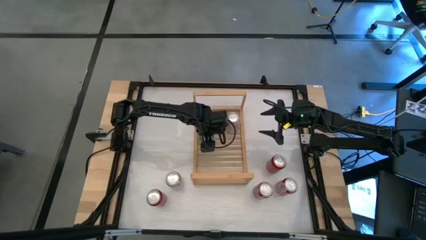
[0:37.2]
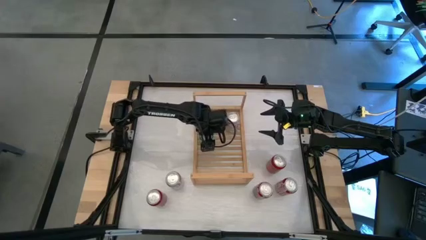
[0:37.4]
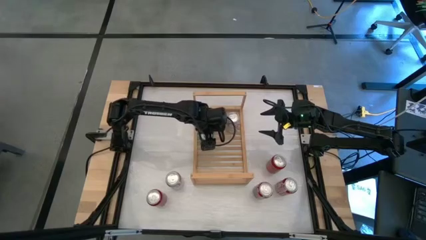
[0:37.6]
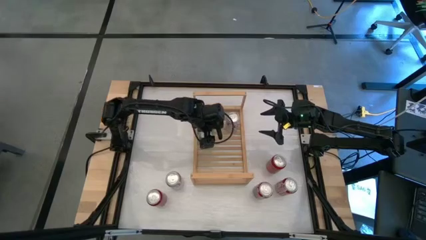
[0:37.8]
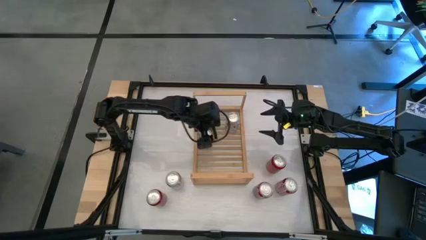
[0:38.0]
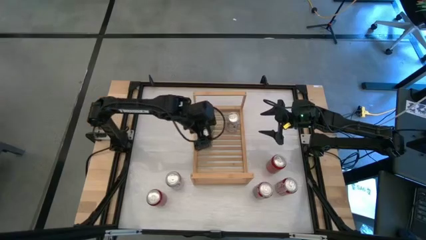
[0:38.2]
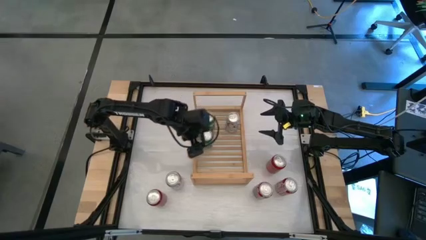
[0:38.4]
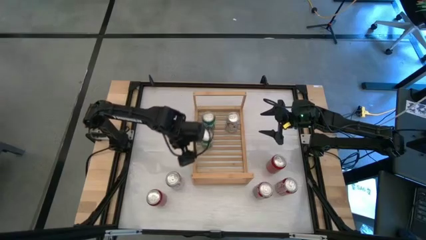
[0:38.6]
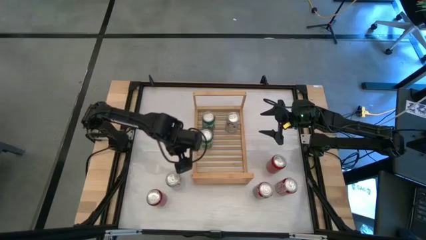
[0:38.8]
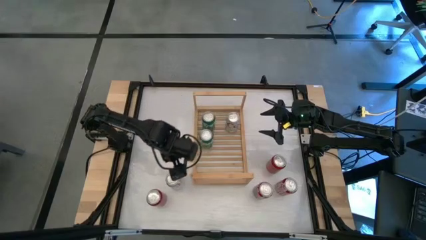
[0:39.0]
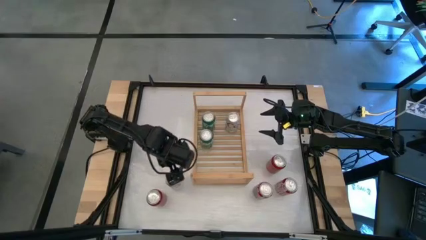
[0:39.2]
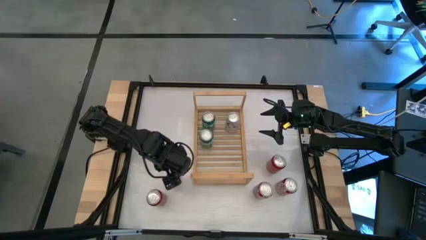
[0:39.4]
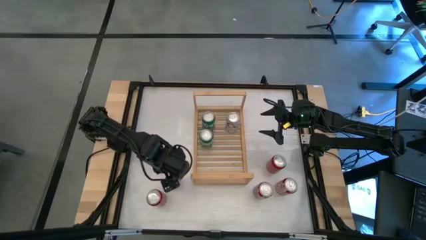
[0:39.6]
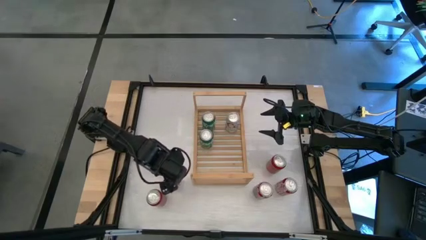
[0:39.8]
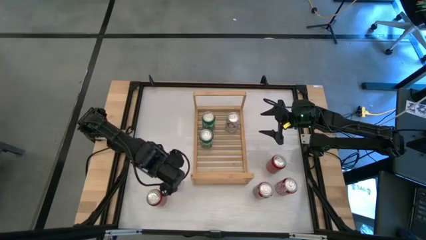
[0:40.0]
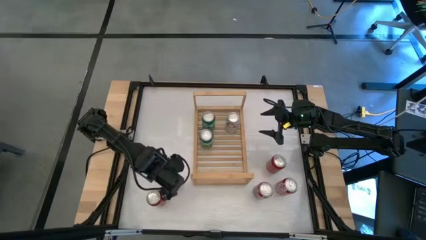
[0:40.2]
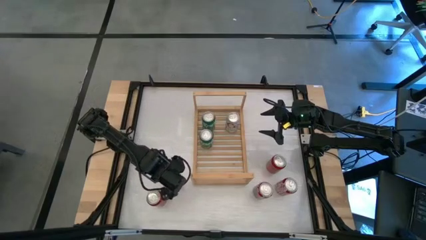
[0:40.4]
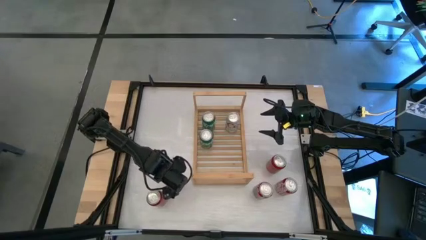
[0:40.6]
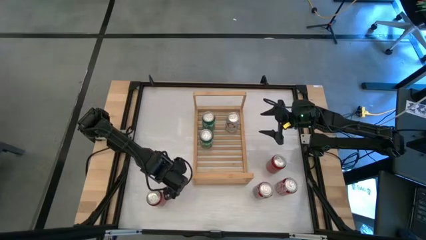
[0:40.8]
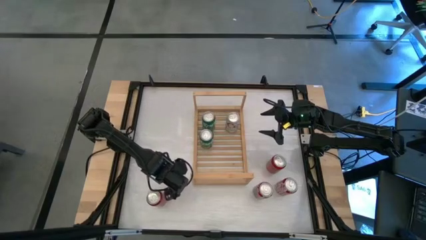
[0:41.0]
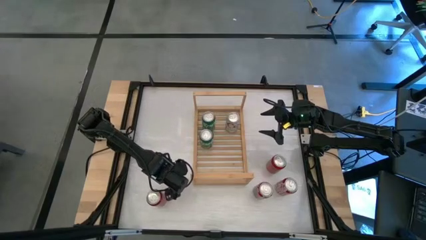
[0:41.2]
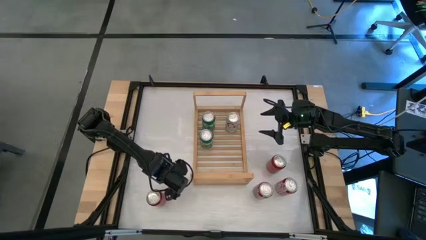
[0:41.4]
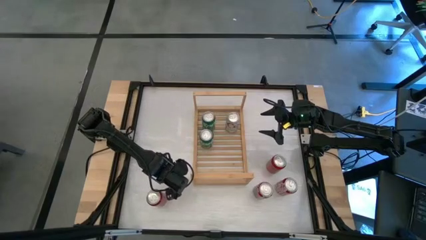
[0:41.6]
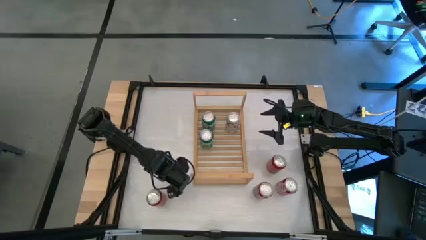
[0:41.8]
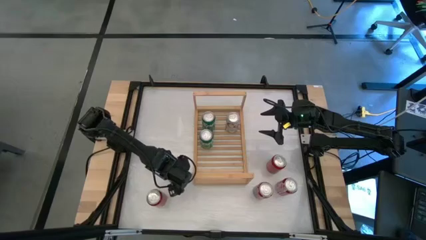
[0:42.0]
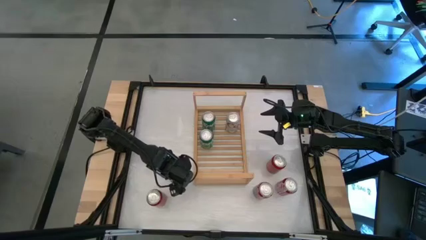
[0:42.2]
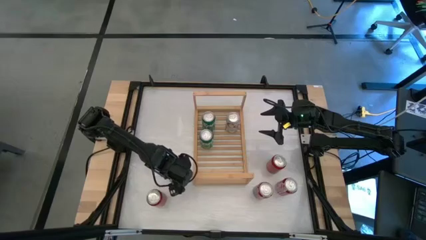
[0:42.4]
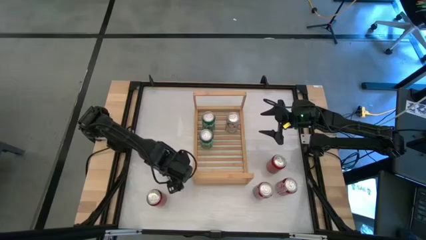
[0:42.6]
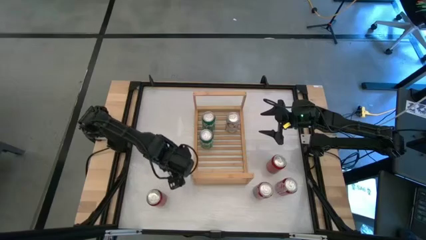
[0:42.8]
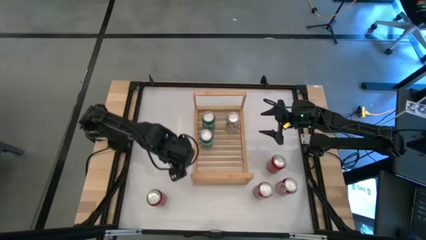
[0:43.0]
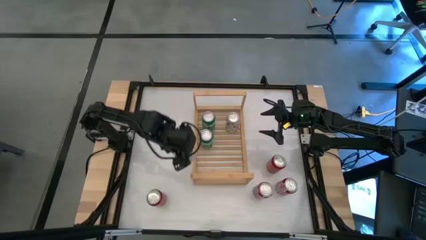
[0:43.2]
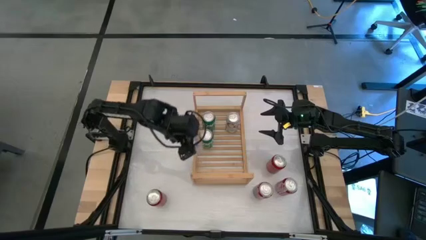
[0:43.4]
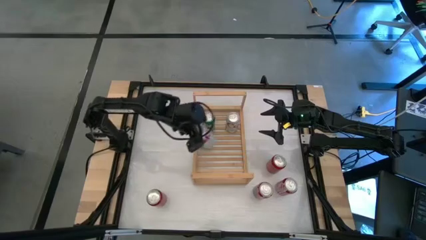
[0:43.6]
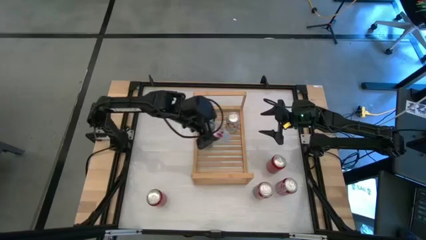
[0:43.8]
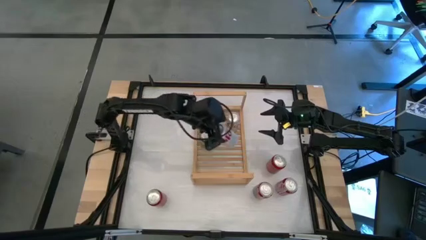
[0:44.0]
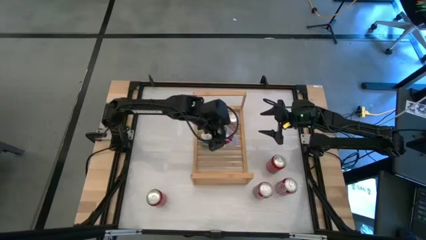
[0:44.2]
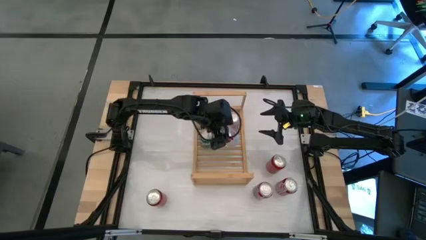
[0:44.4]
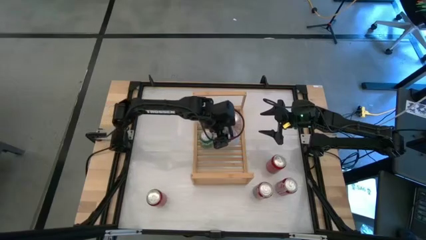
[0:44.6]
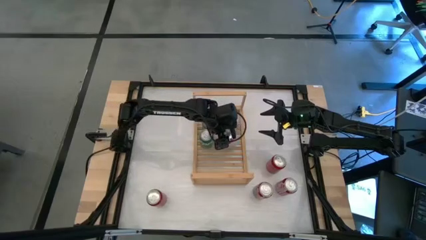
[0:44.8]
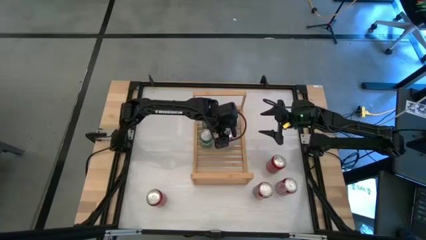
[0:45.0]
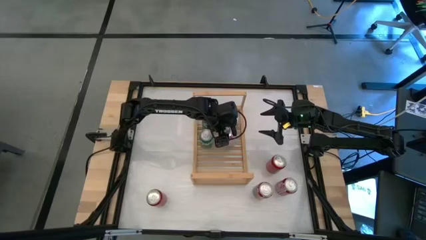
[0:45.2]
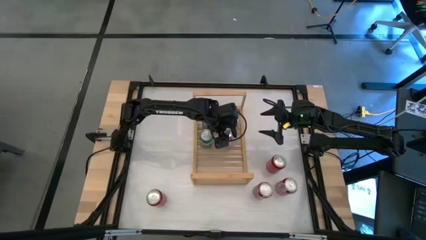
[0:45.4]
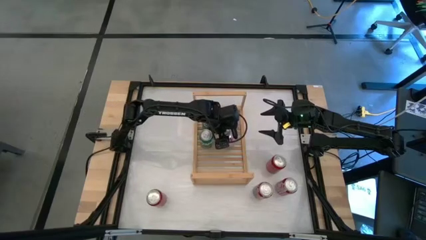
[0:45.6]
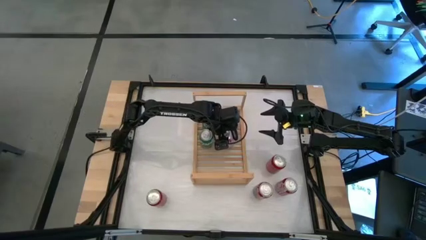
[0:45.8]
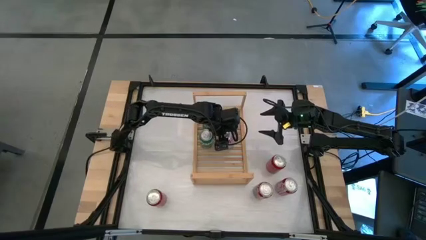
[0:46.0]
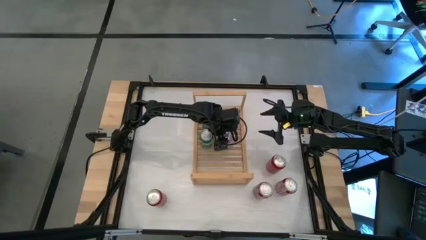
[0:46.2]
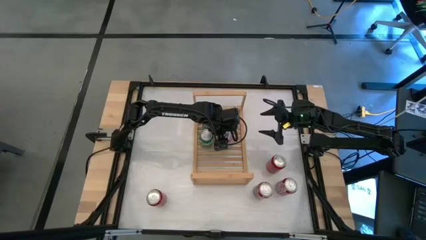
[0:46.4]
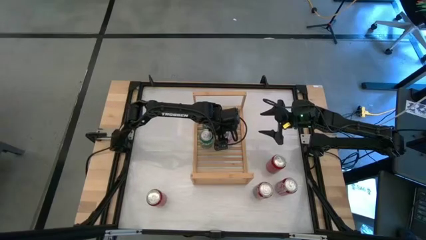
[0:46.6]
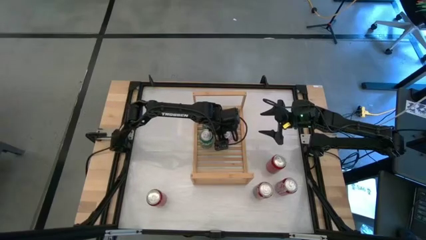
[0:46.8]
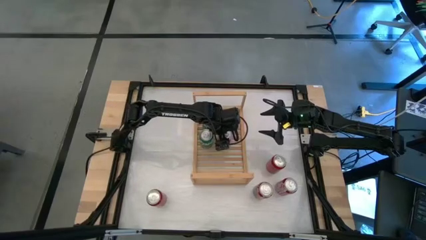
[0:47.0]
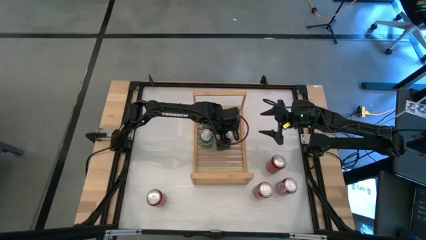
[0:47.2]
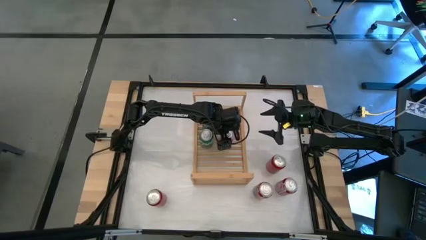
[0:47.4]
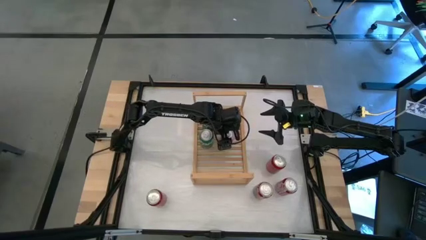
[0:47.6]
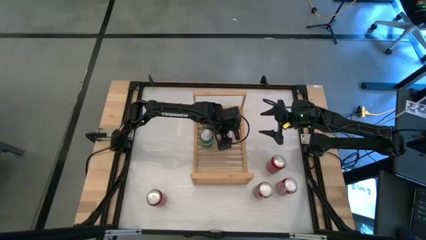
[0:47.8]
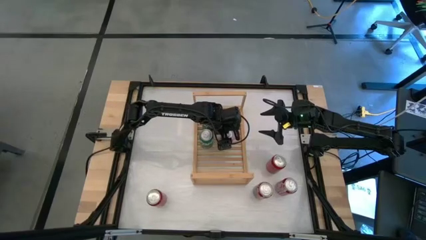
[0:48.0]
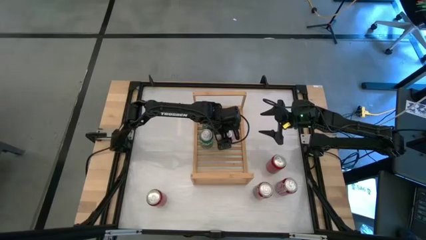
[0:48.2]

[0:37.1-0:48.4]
Task: Place canned beverage on shelf
Put the silver soda can on the shelf

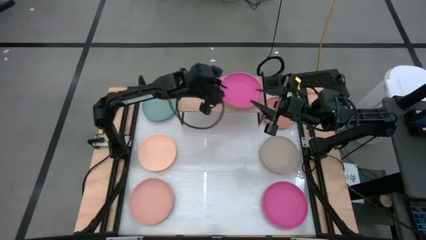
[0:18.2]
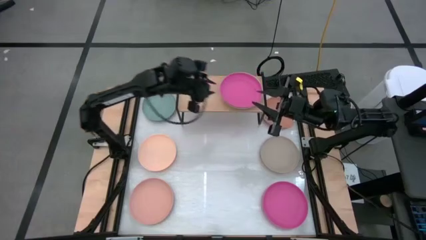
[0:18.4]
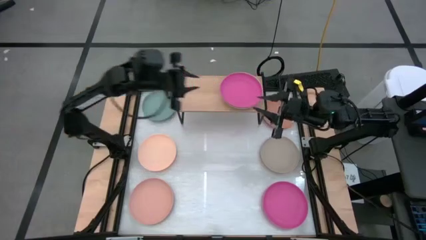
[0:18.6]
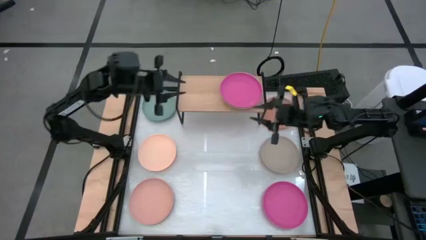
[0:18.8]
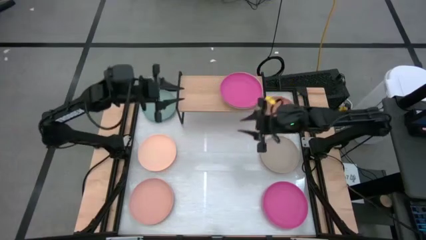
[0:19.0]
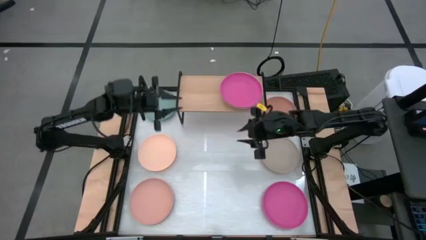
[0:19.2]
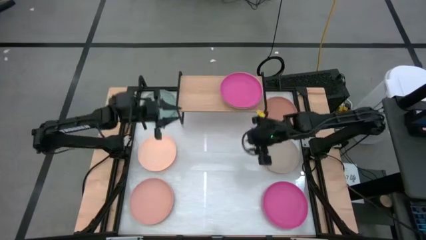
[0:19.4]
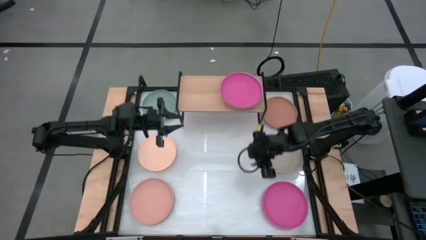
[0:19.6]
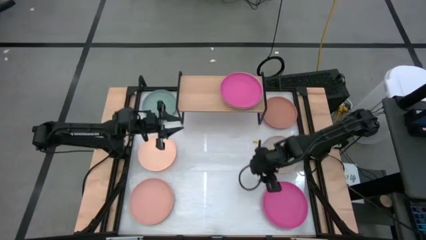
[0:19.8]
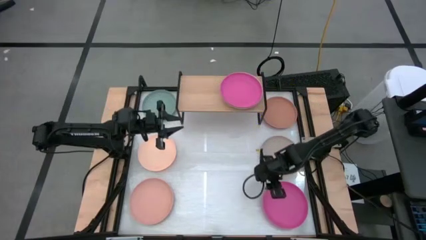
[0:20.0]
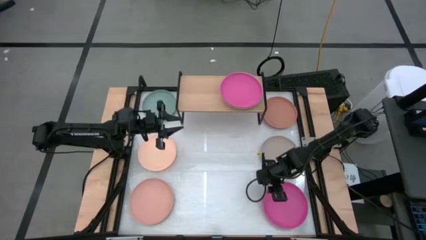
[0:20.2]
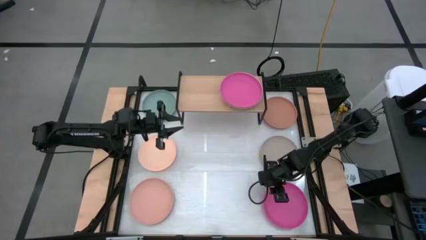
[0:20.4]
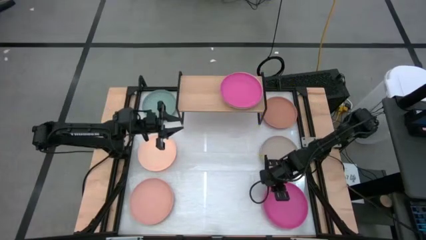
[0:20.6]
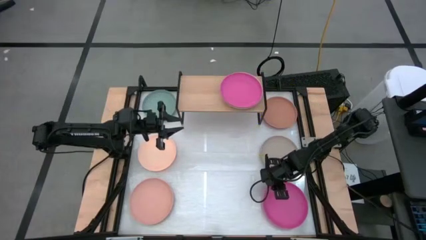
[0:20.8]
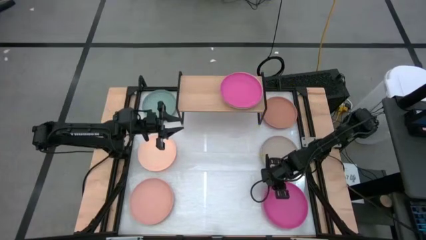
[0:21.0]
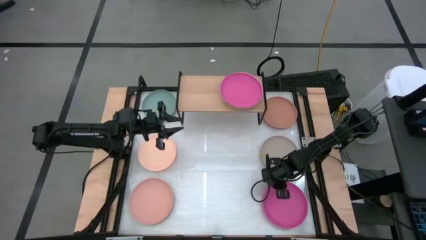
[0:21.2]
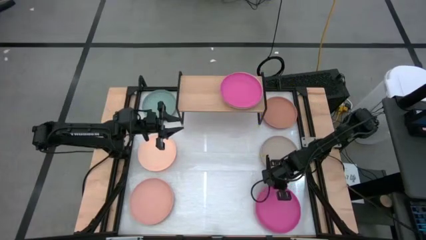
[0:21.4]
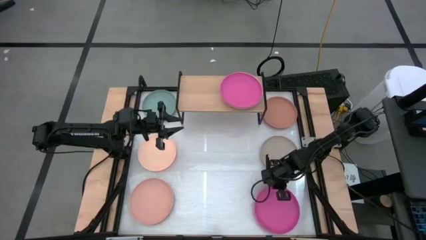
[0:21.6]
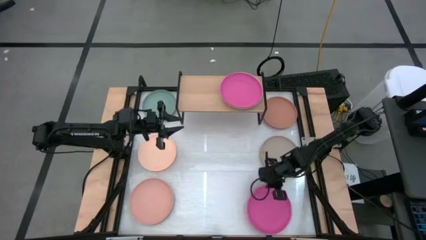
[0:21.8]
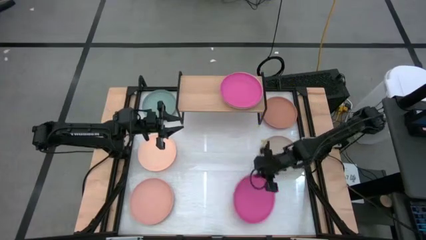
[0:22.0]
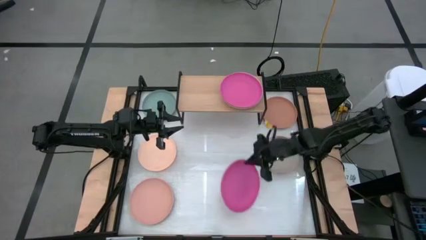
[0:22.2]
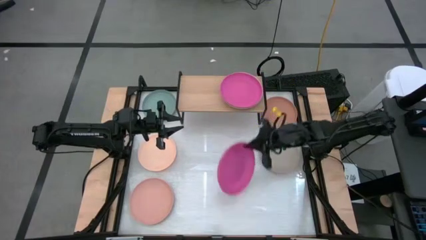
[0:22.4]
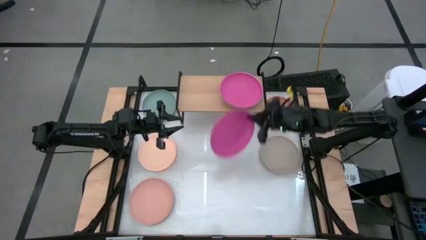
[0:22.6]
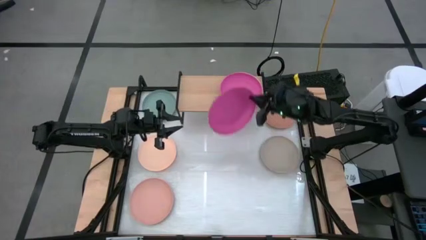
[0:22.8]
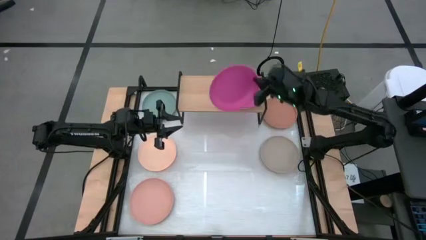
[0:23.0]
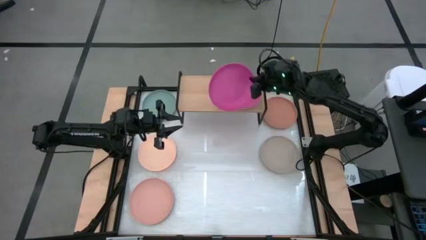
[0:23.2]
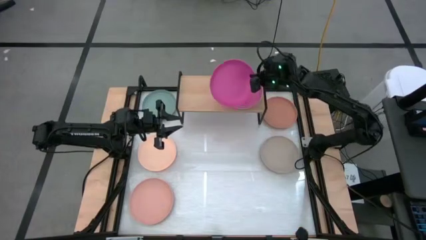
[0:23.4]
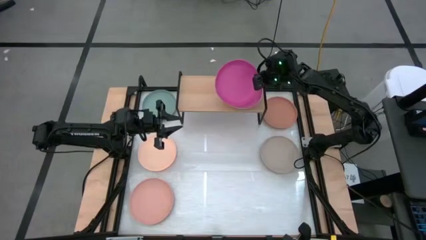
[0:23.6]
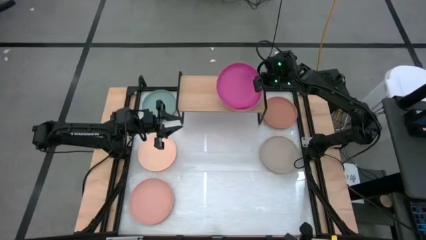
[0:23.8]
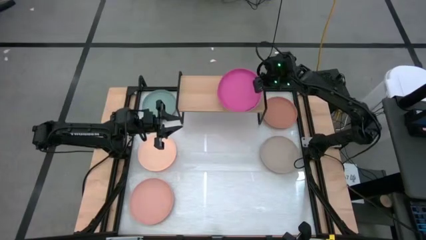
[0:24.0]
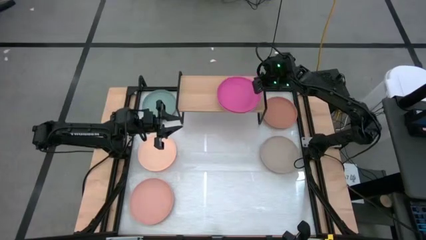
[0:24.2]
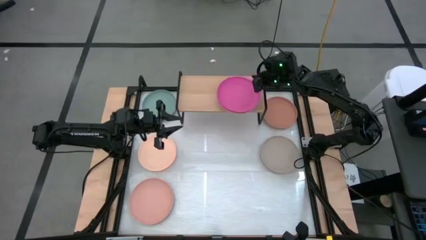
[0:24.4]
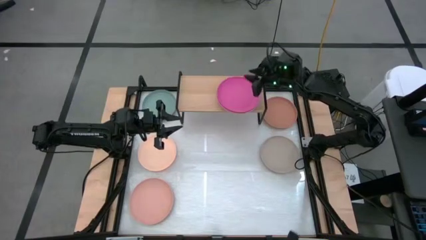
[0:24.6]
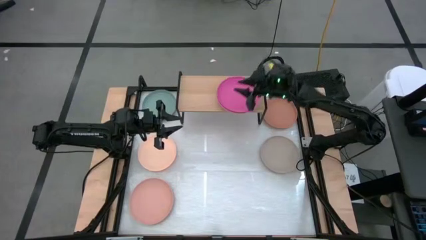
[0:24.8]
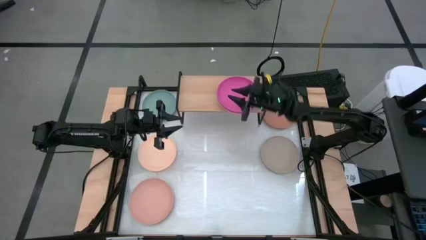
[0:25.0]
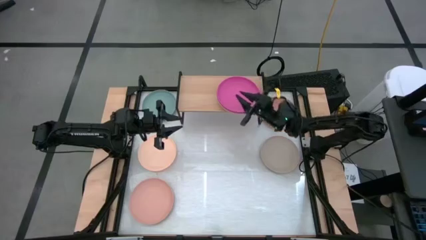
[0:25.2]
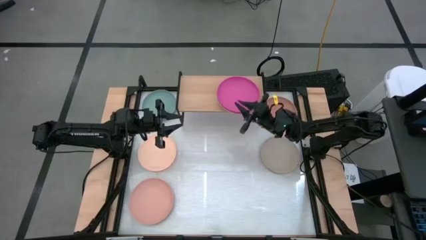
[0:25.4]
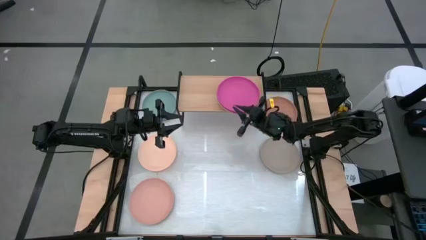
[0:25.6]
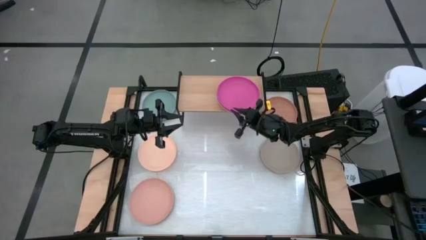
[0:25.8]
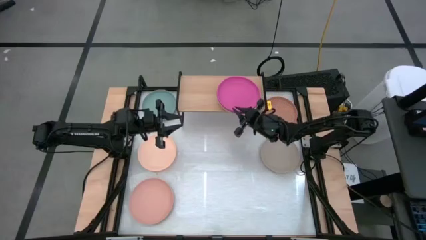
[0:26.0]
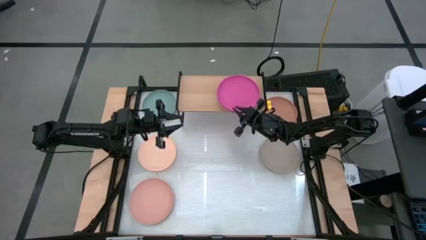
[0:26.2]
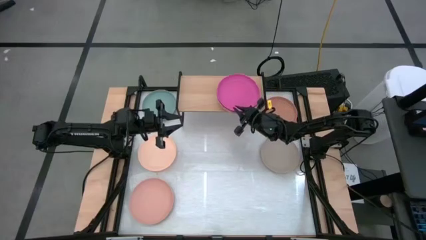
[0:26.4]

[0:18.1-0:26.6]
Task: Place and stack plates onto a shelf
Stack the pink plate on top of the pink plate on the shelf
